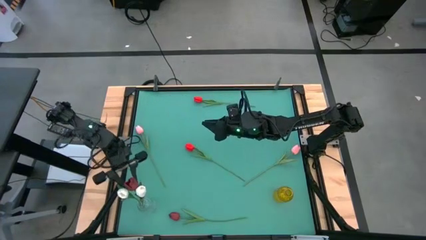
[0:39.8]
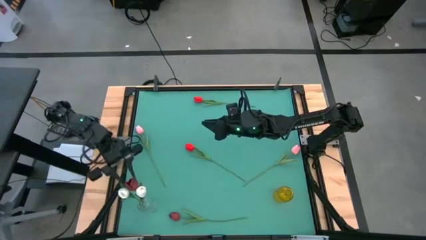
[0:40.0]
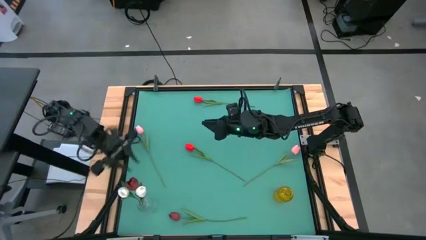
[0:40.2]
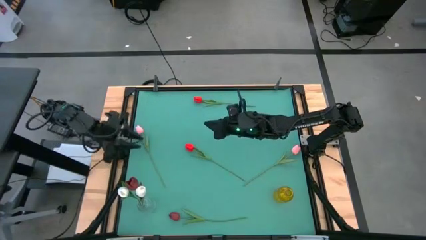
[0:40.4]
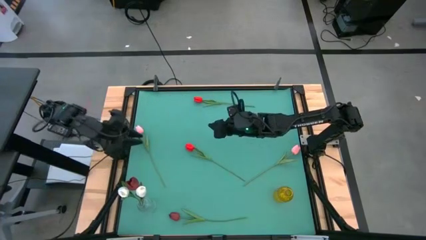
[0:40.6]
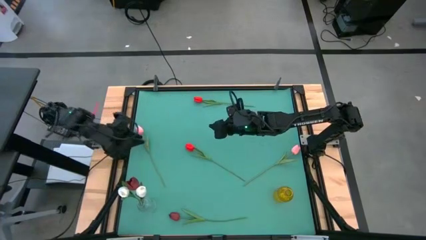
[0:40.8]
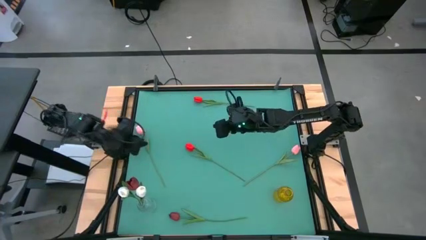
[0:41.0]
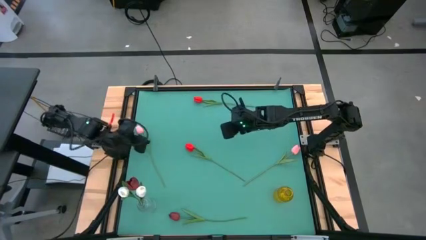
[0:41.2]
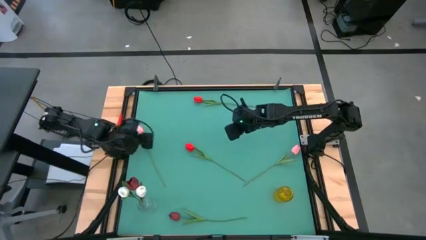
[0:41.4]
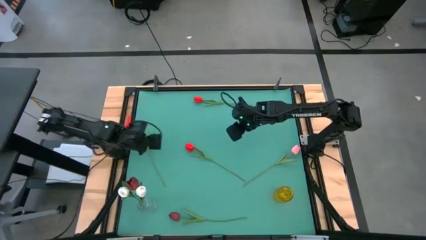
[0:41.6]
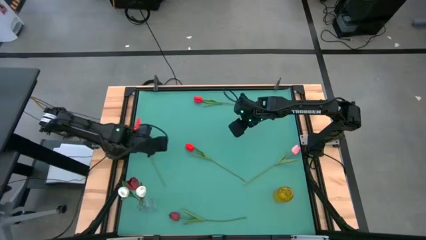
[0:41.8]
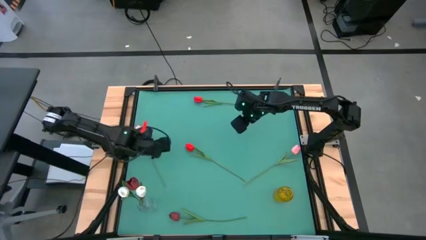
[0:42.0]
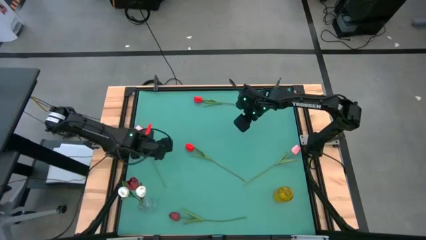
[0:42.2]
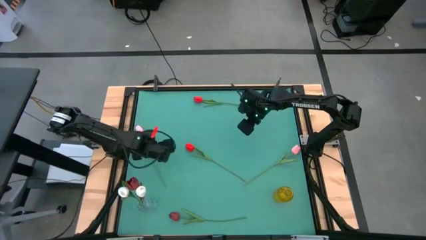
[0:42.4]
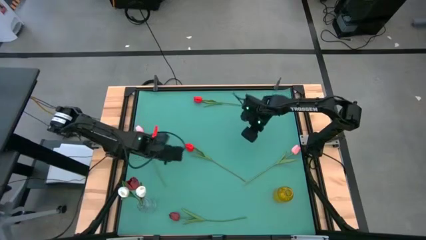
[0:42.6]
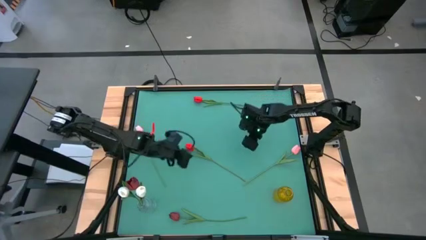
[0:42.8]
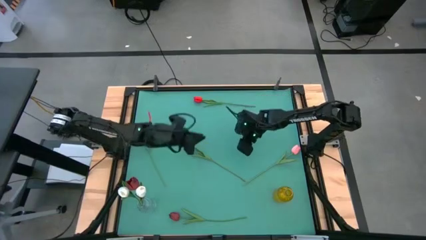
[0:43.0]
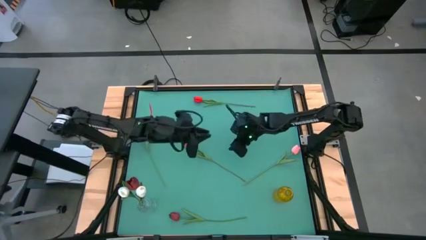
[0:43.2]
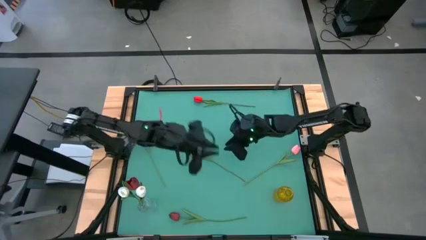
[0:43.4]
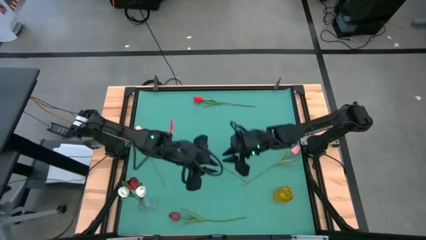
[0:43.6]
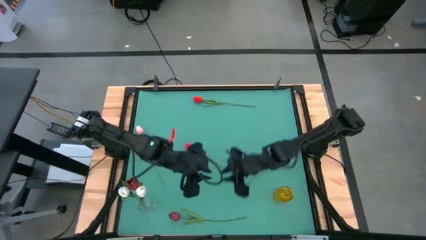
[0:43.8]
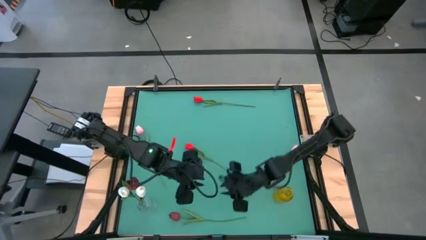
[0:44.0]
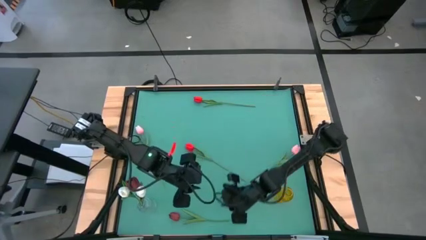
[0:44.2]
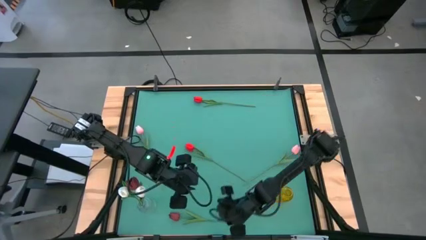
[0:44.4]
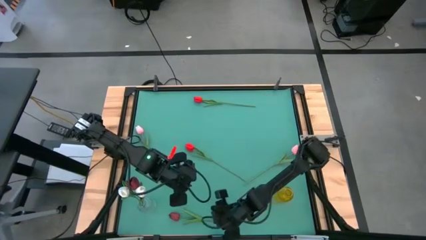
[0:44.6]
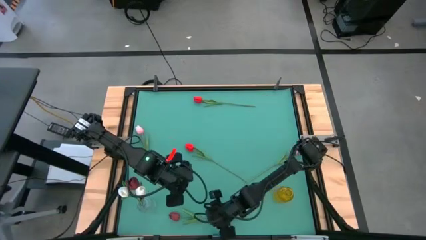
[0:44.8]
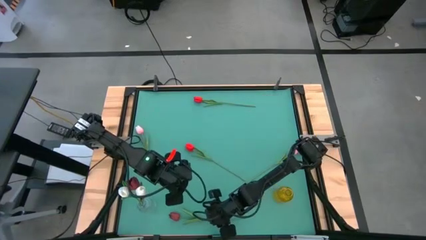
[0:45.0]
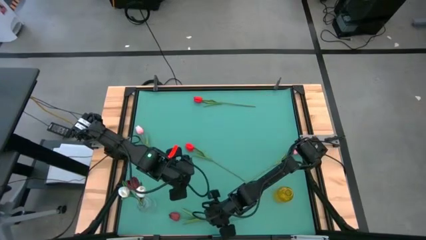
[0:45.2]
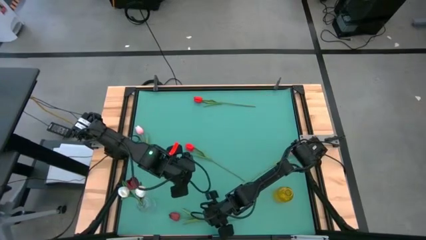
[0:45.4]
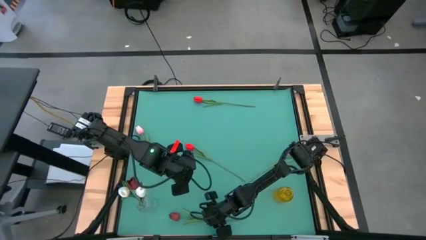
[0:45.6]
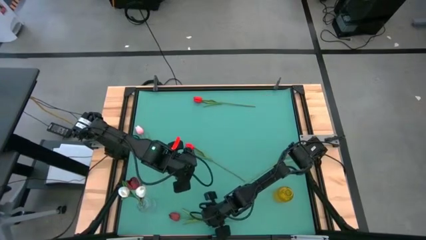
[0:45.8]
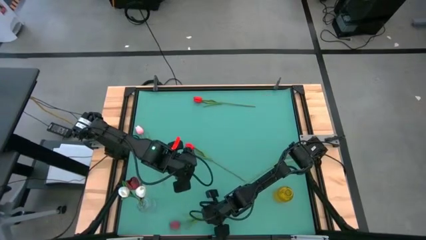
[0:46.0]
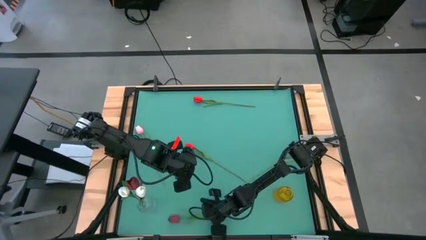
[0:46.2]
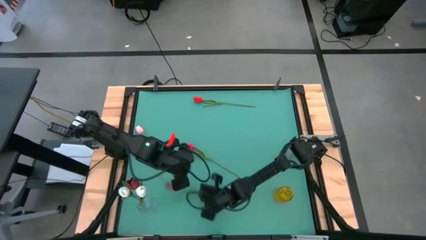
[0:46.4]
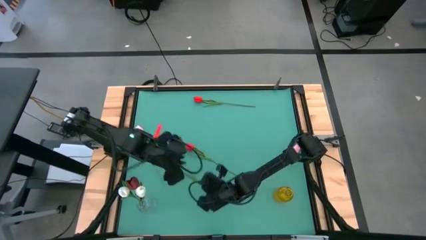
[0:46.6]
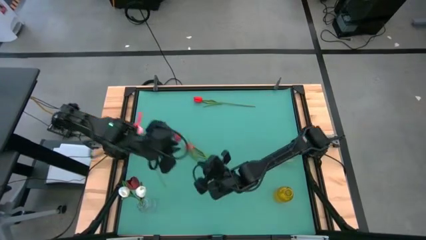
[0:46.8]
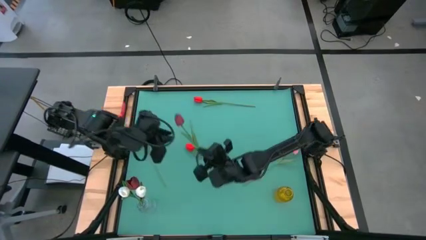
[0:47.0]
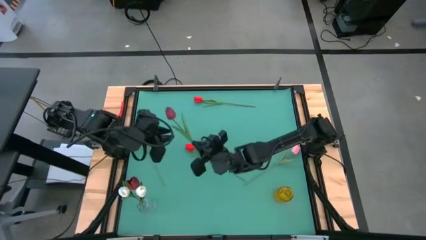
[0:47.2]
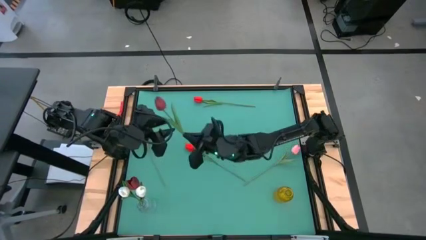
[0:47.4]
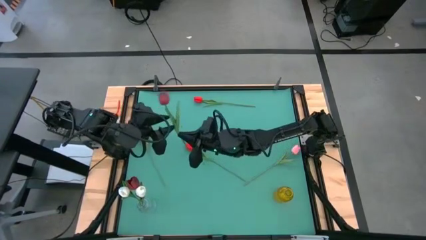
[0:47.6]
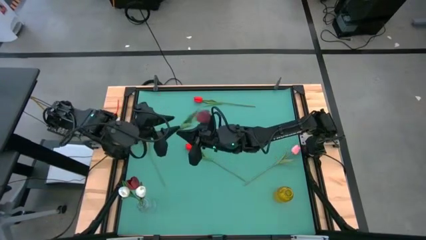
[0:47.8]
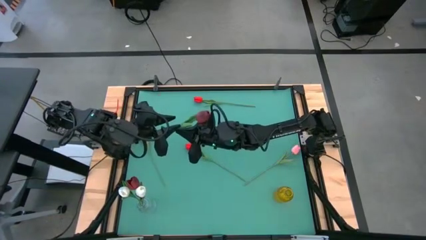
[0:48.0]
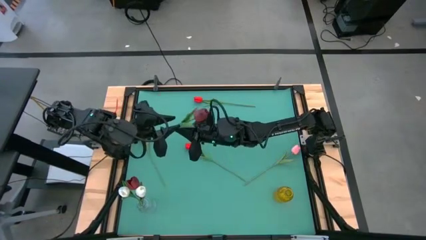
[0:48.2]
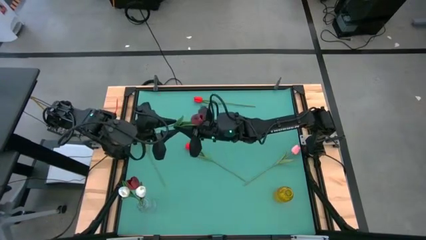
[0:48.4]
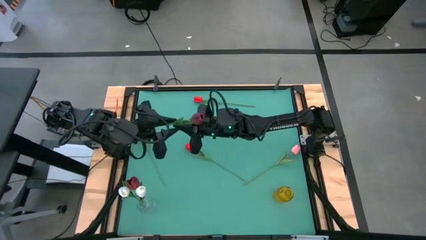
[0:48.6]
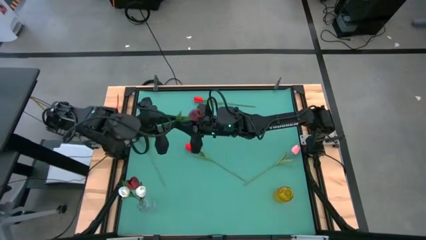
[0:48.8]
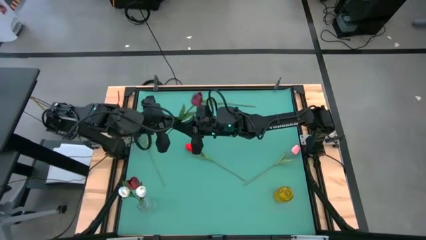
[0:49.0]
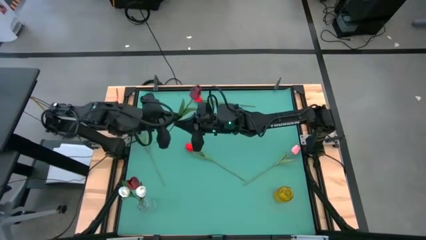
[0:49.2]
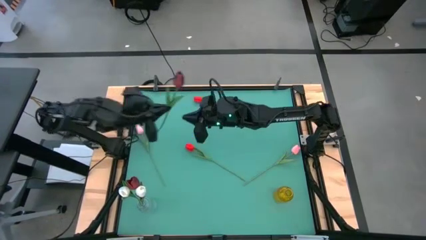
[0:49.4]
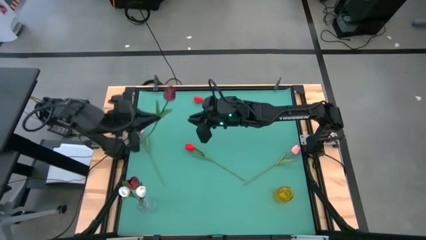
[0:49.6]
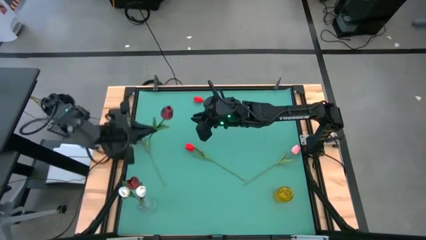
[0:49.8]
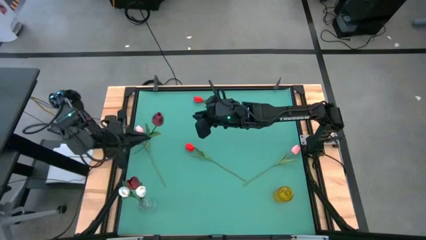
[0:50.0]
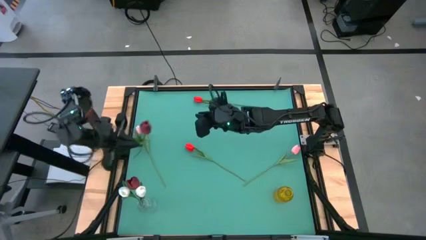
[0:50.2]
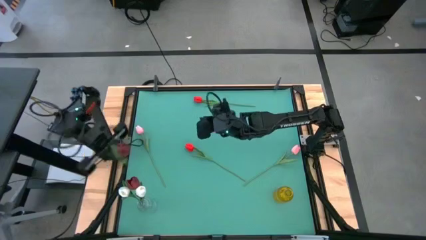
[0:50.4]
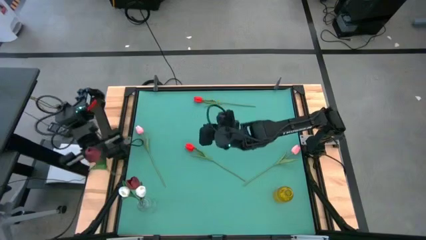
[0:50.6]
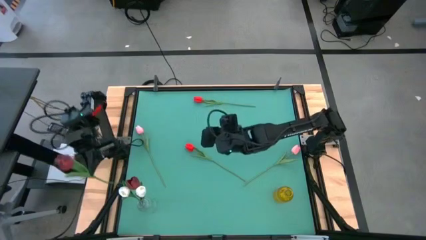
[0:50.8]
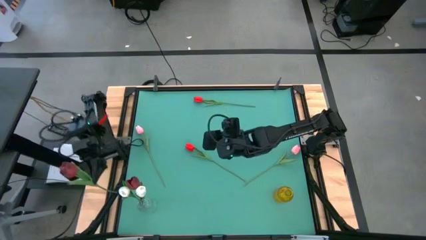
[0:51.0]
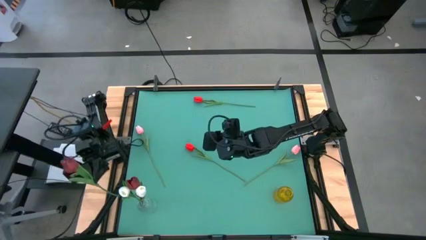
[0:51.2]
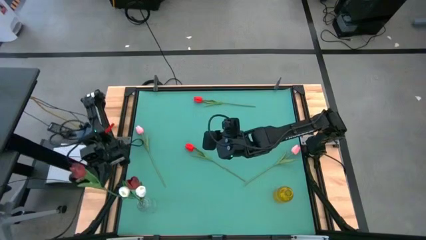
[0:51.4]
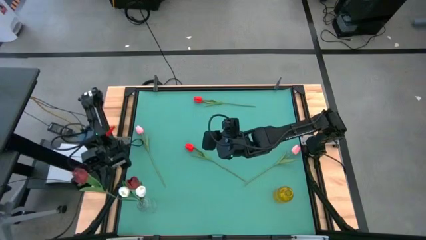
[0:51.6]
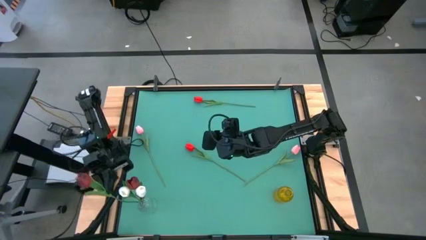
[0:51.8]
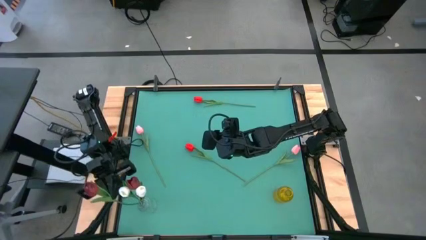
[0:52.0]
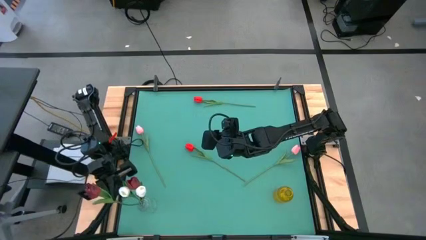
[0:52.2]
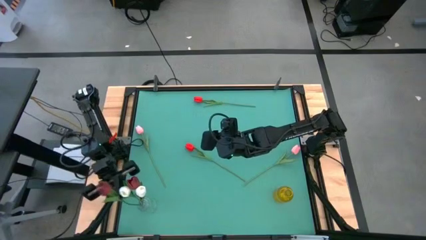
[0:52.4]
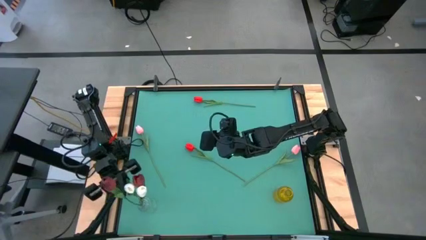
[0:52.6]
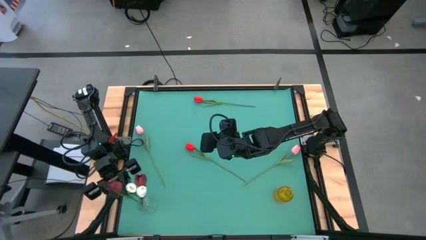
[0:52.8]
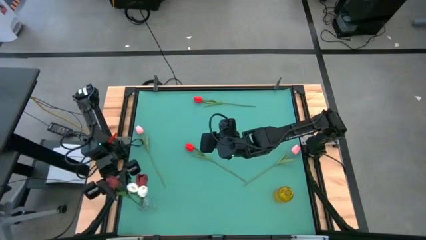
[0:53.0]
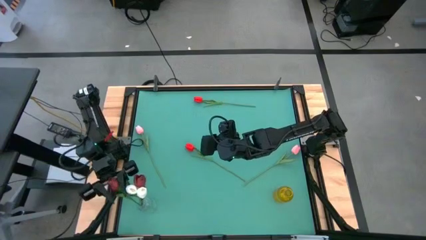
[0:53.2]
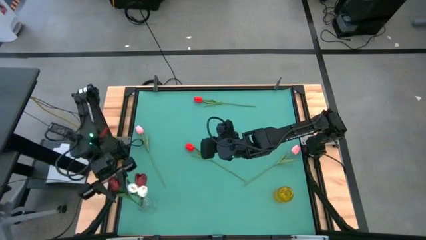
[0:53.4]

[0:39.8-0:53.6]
Task: Sort flowers into vase by color
Put the dark red flower into the transparent vase
